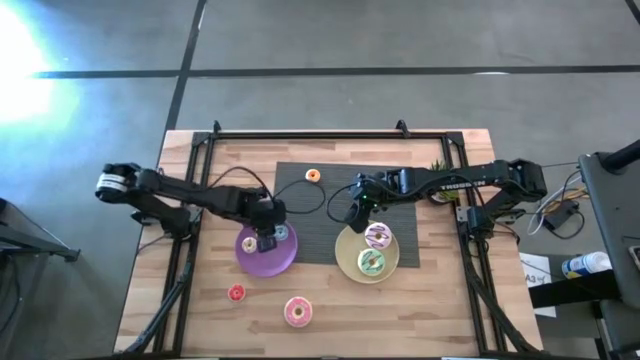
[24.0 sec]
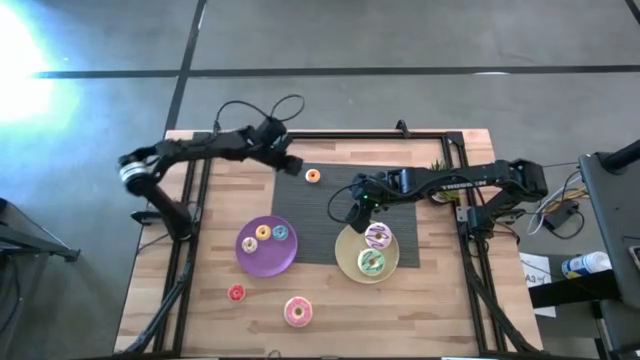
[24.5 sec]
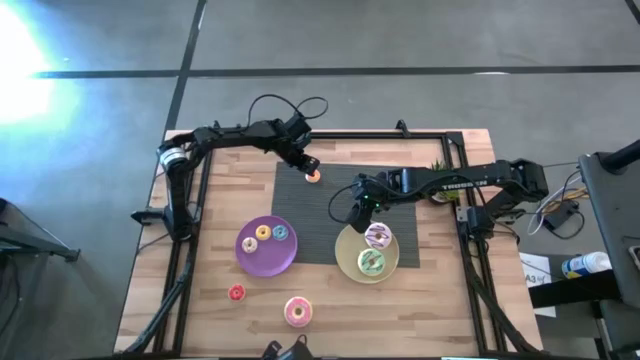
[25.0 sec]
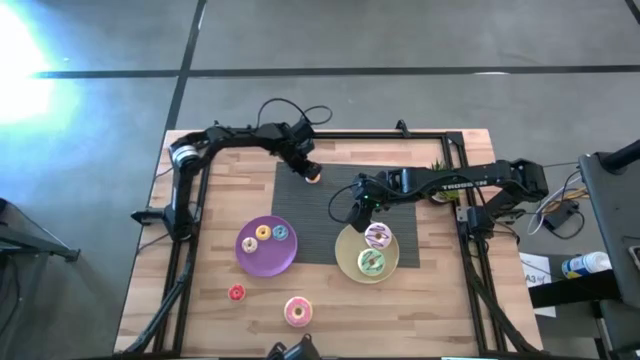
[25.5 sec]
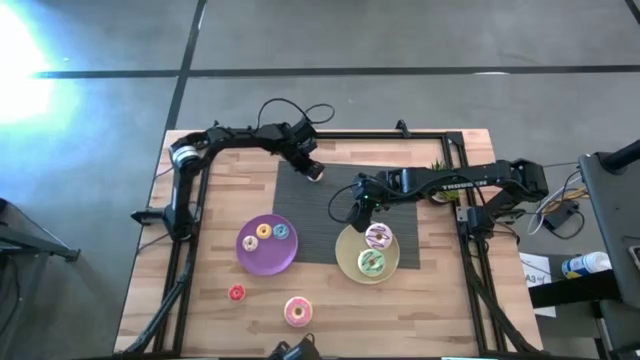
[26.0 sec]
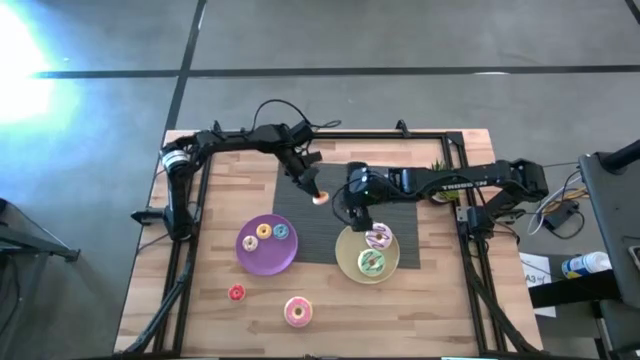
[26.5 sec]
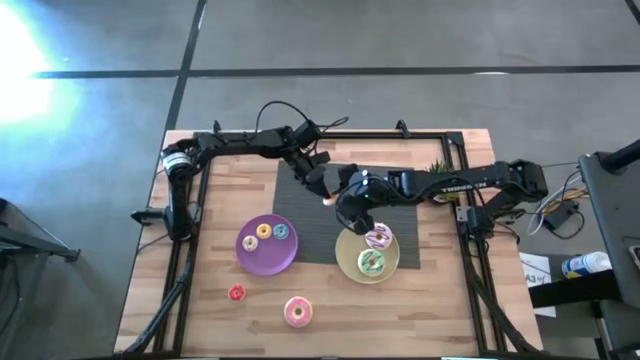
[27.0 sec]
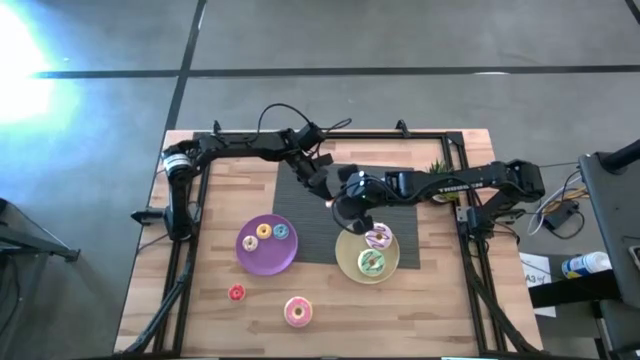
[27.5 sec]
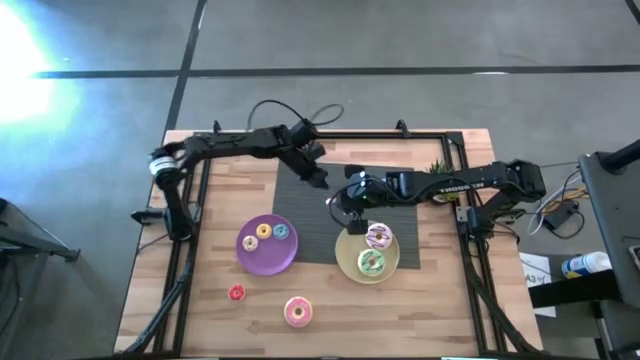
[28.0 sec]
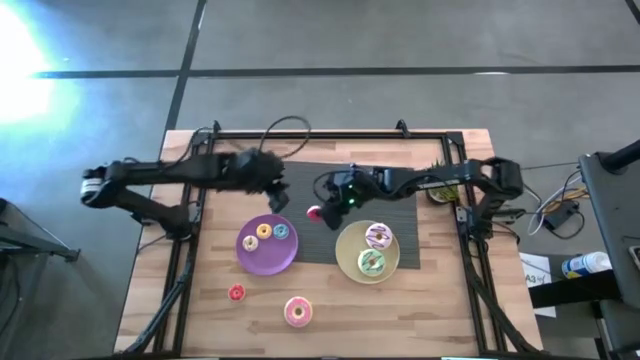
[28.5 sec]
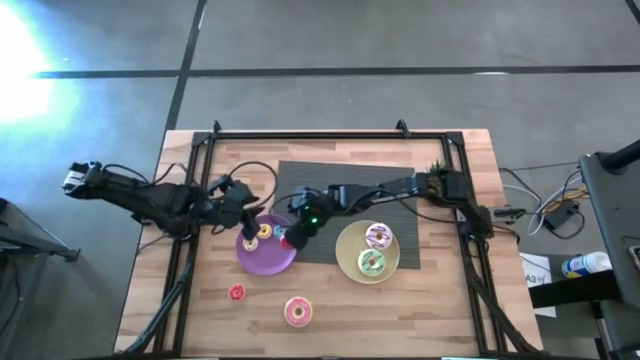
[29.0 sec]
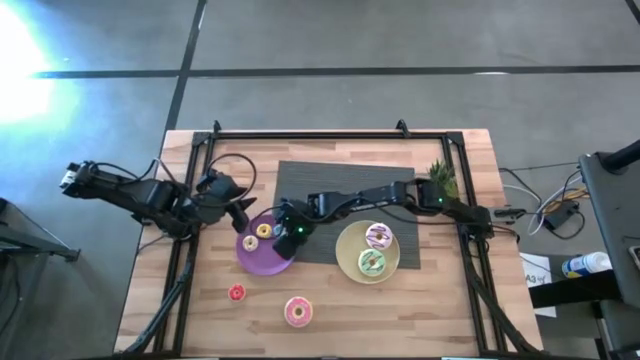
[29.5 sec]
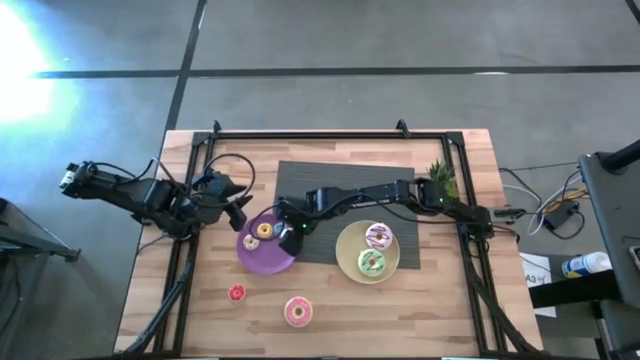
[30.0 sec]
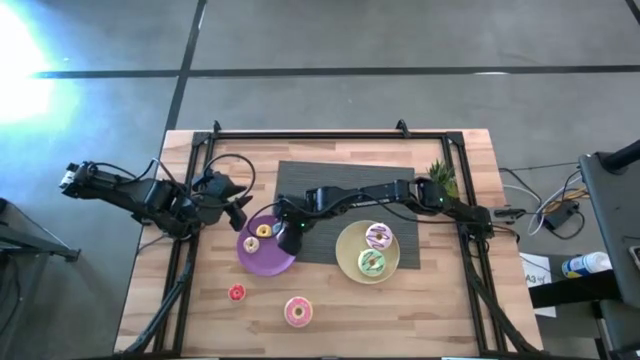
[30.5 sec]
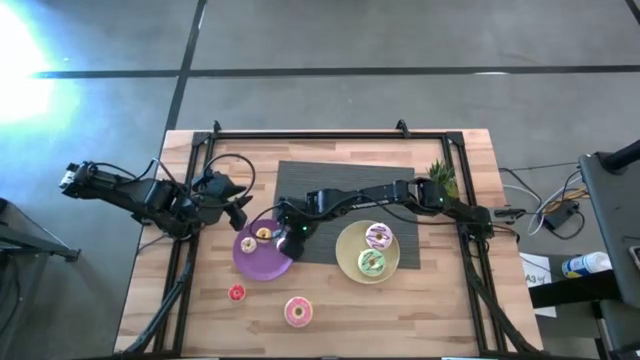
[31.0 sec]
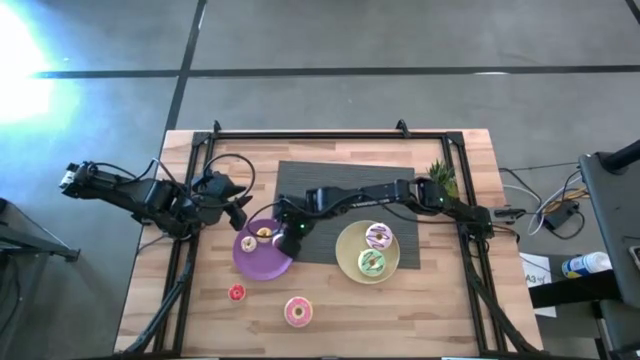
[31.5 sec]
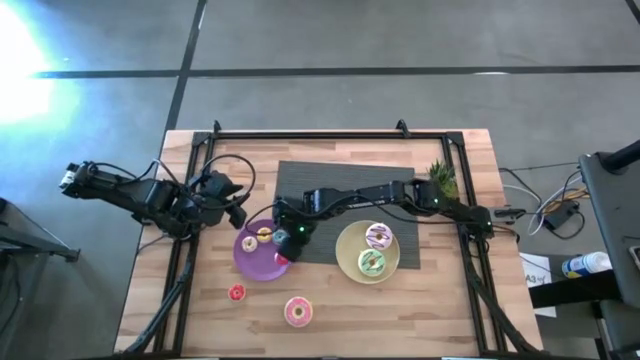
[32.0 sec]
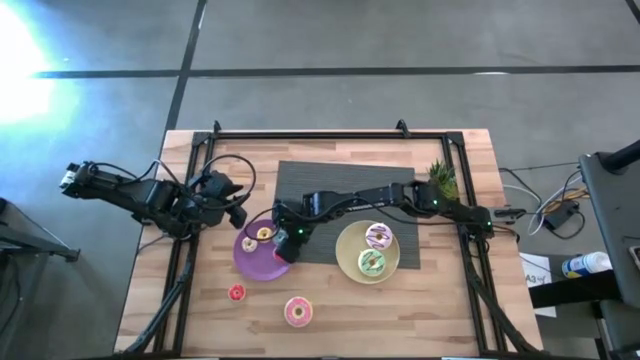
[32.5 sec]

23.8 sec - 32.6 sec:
Task: Pick & Place donuts
Put the small red donut on the purple plate

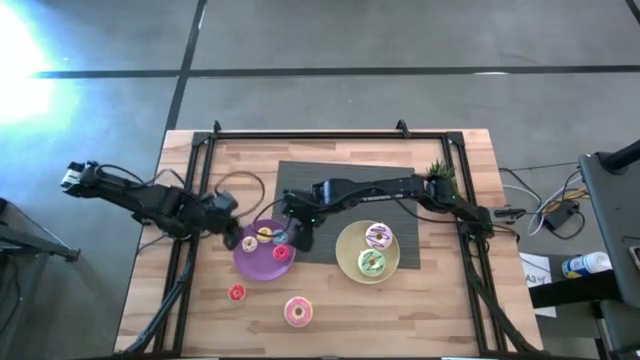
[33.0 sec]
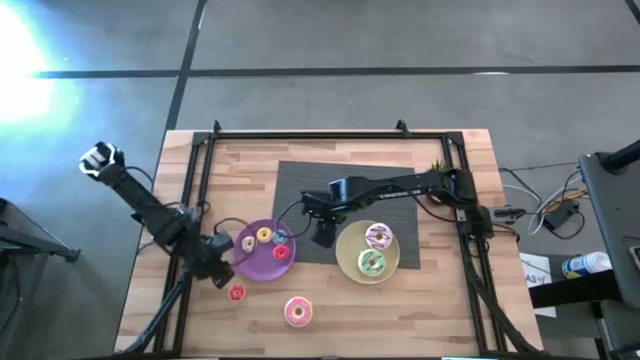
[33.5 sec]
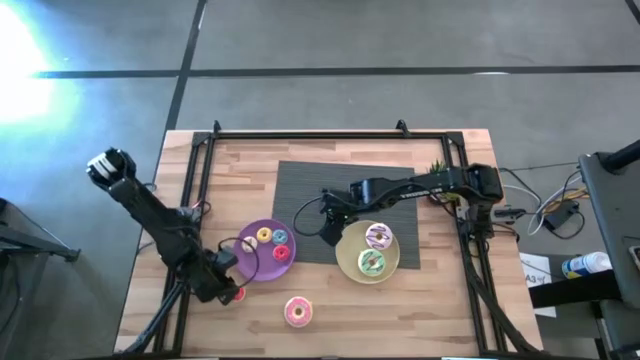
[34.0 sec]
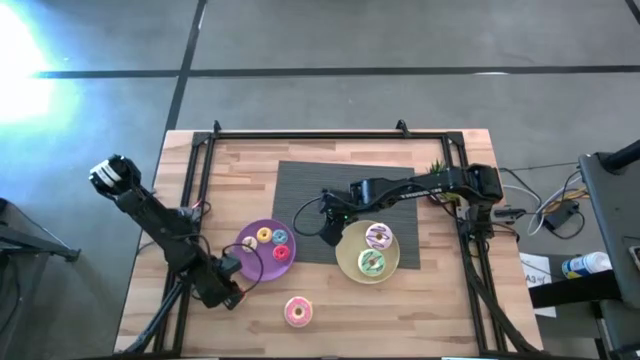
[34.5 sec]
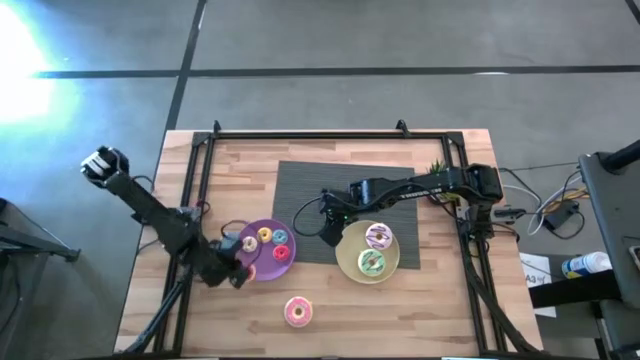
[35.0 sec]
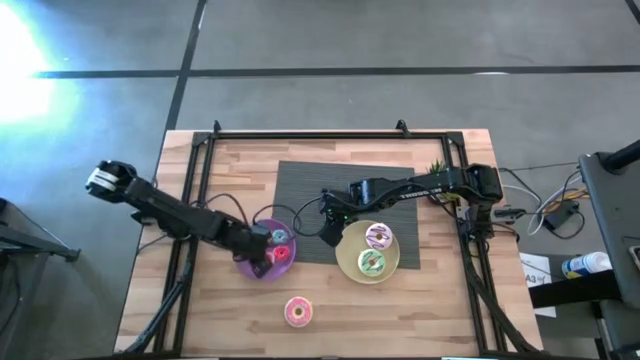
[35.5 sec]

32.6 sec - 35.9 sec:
Put the small orange donut on the purple plate

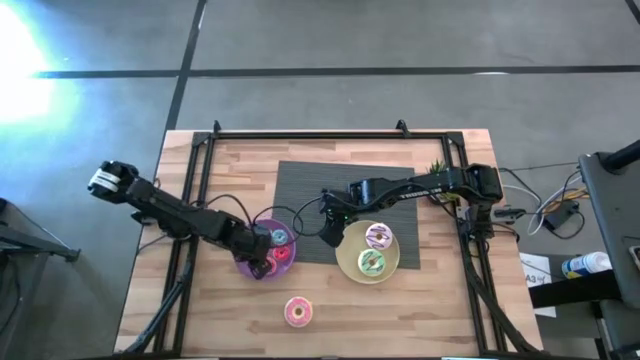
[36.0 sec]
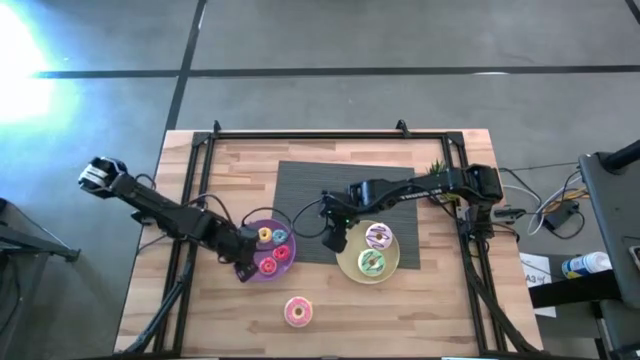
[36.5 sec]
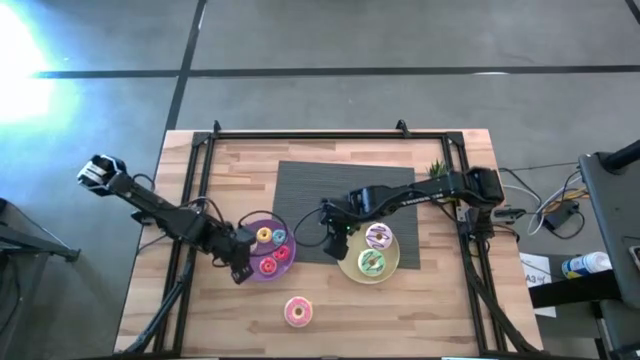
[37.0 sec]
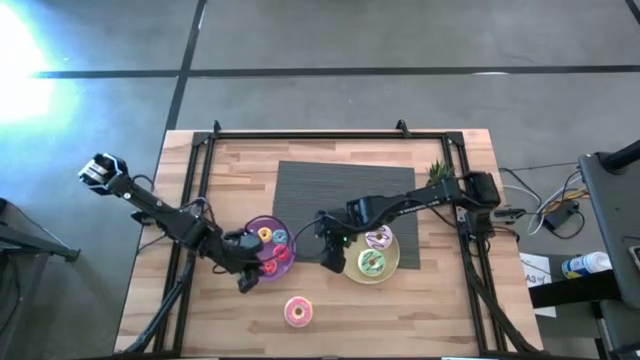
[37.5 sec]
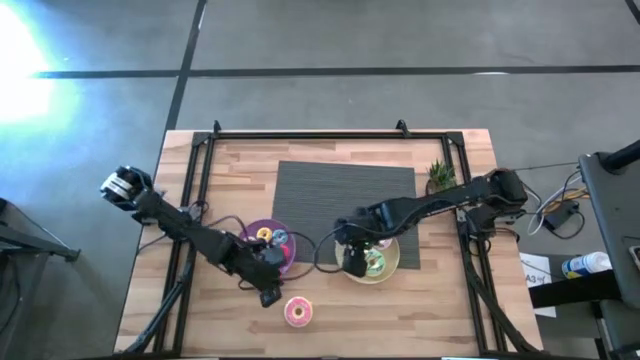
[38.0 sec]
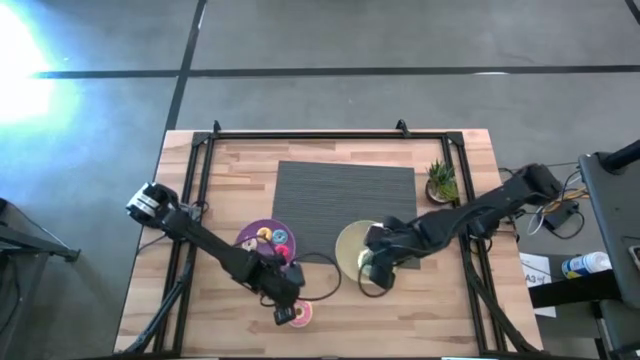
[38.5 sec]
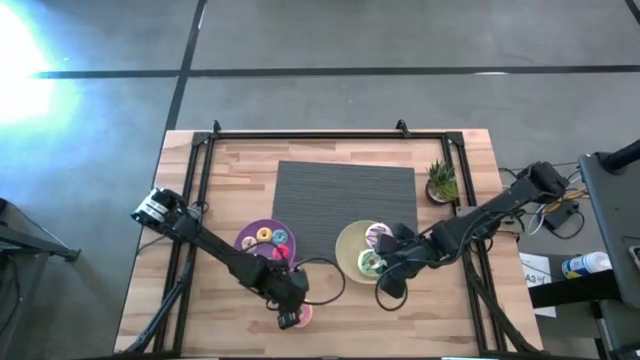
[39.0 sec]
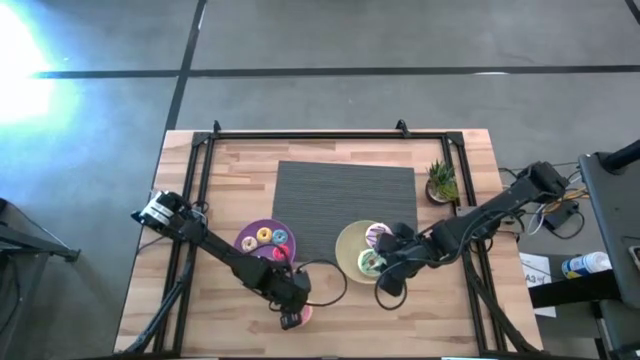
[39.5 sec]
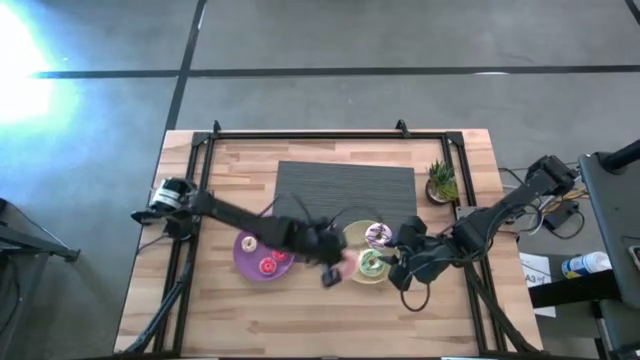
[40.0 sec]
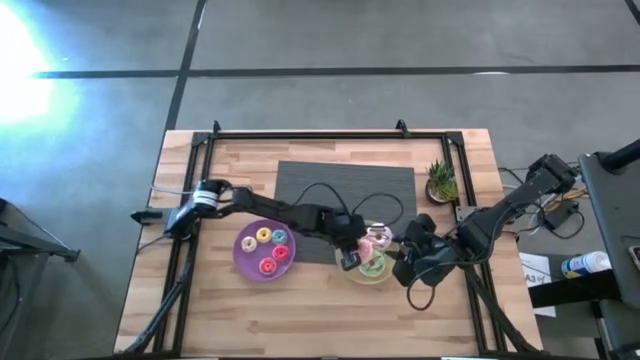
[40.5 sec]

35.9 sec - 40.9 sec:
Put the large pink donut on the brown plate

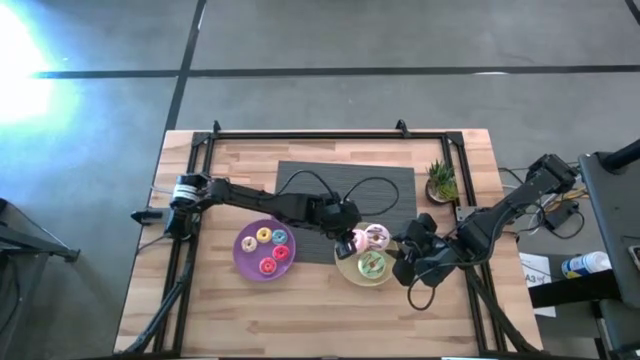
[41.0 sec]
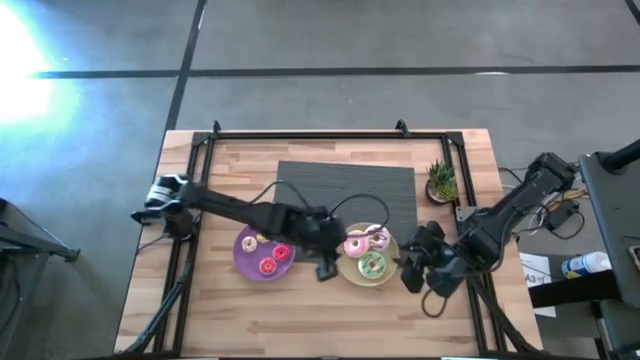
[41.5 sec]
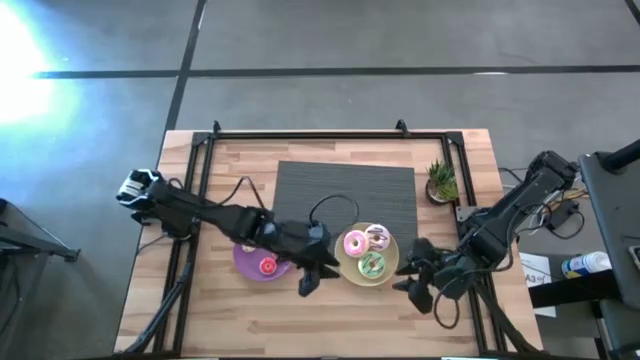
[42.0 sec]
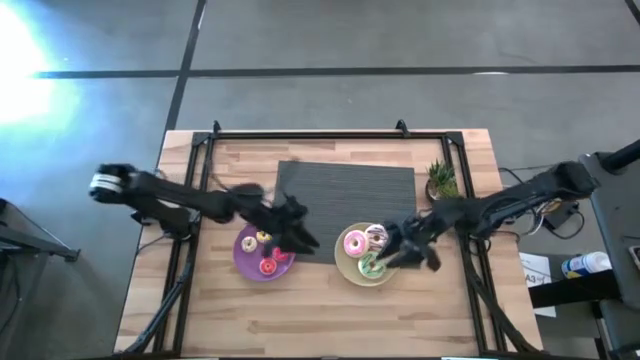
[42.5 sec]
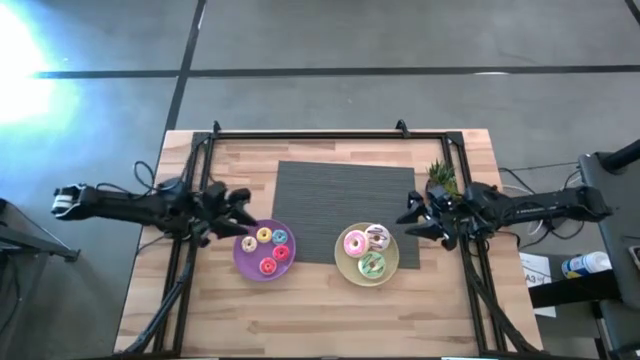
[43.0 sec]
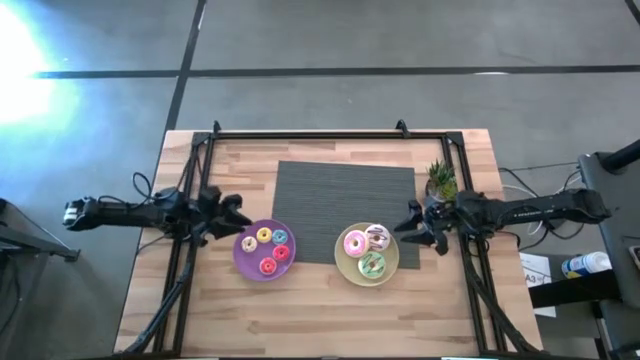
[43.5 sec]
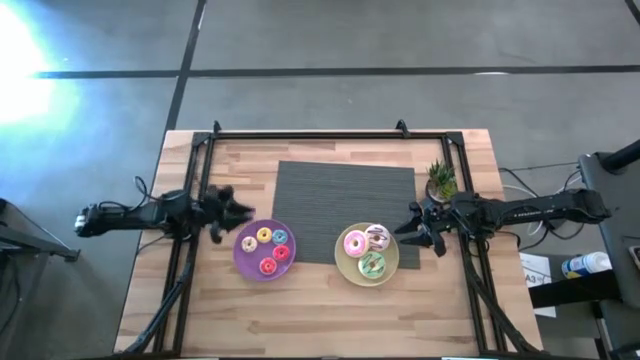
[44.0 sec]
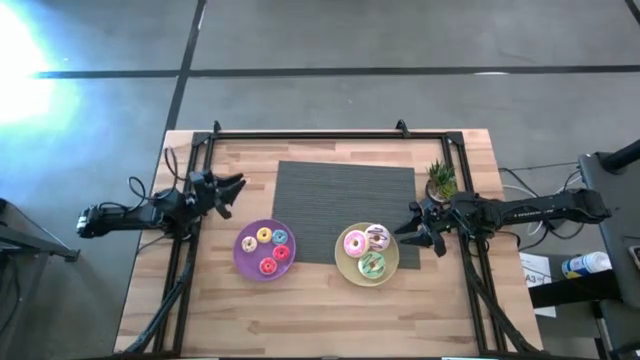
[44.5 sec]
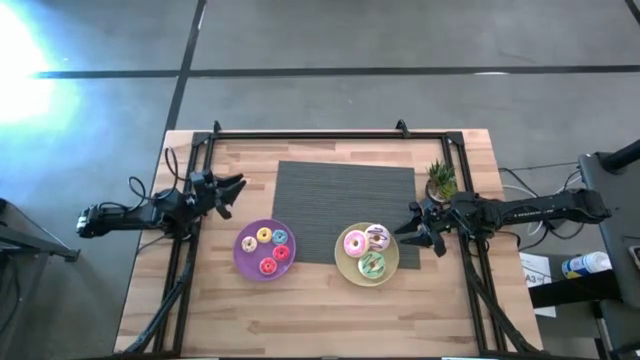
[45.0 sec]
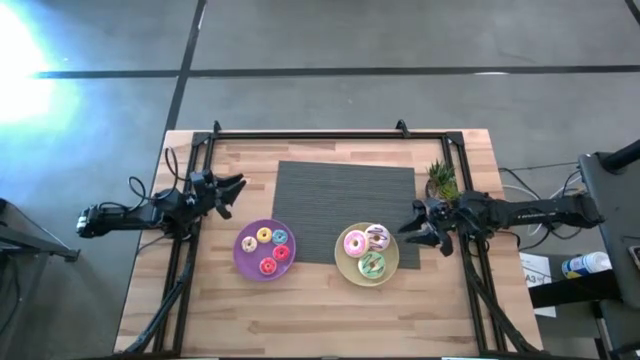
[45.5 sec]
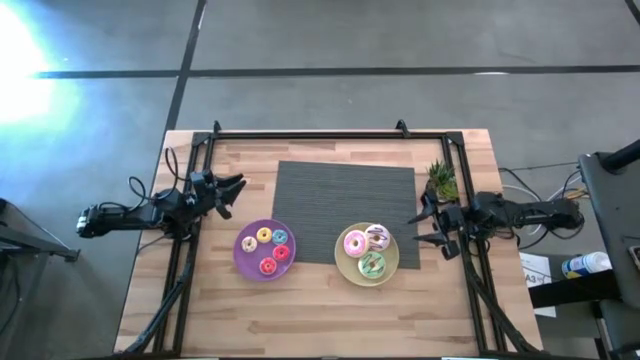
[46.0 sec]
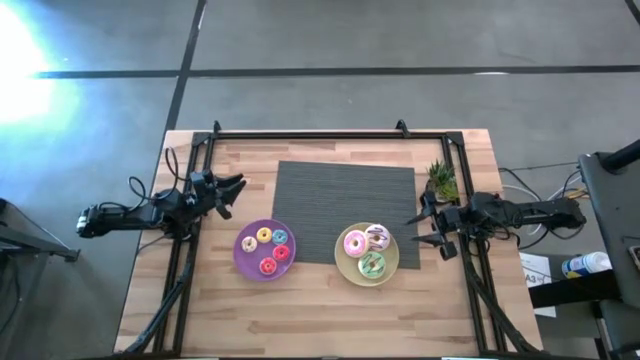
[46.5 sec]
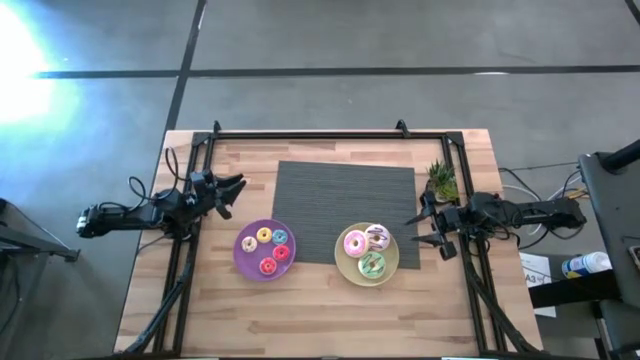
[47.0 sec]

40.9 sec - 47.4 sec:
Return to Home Position
